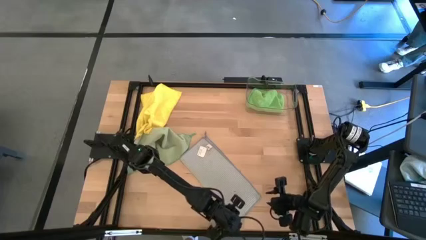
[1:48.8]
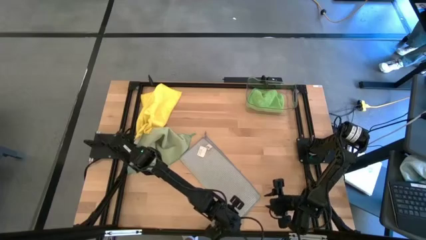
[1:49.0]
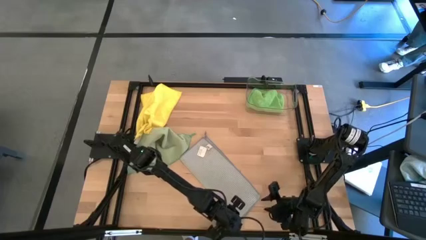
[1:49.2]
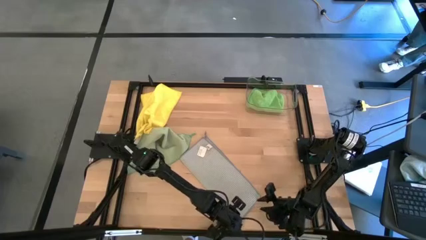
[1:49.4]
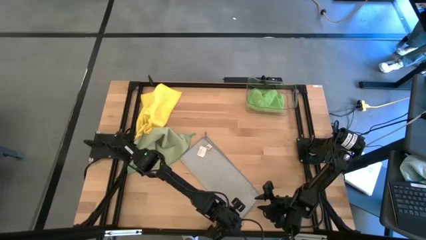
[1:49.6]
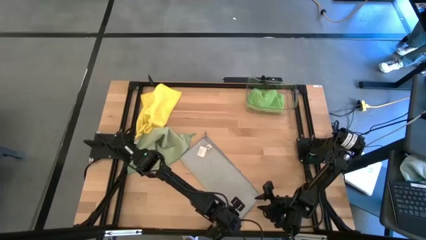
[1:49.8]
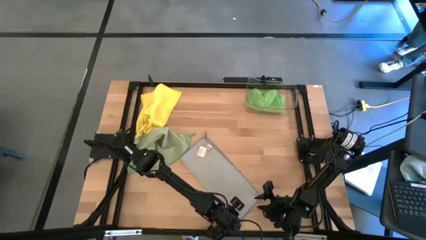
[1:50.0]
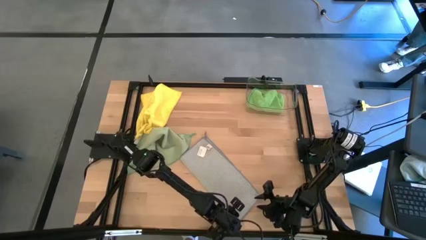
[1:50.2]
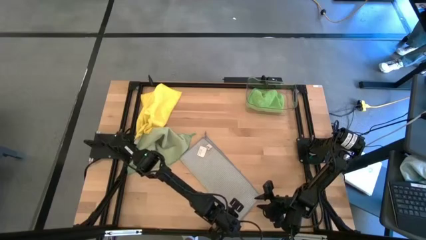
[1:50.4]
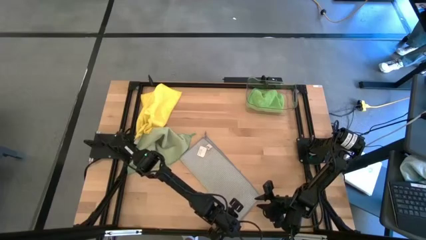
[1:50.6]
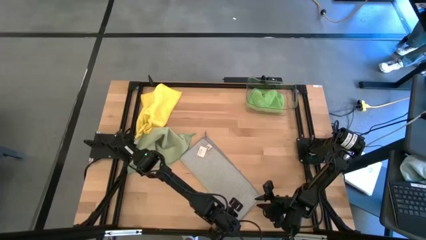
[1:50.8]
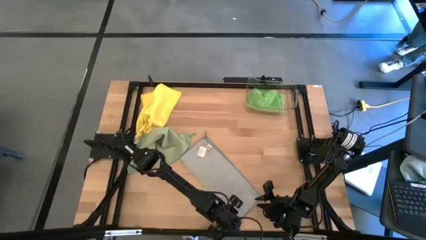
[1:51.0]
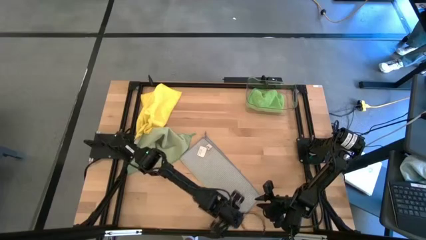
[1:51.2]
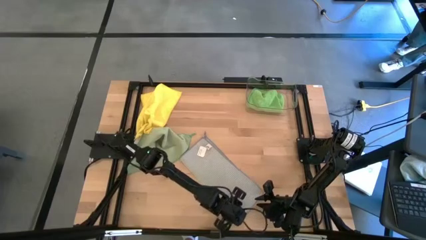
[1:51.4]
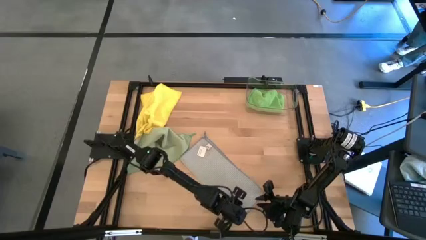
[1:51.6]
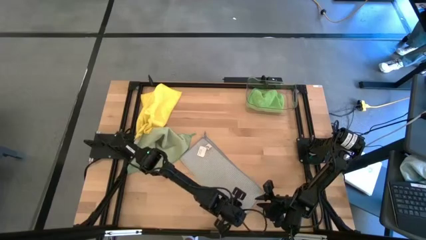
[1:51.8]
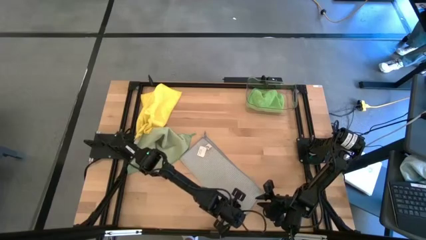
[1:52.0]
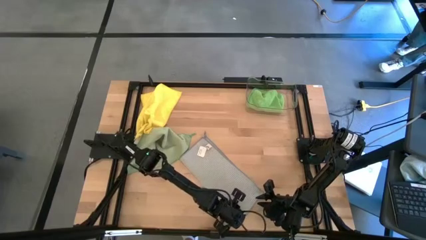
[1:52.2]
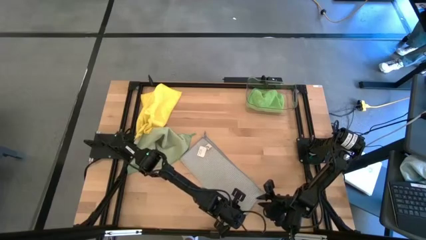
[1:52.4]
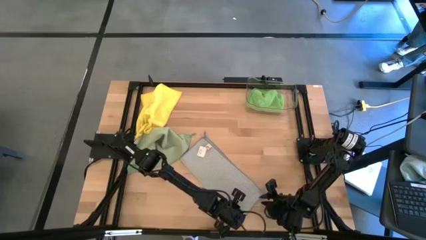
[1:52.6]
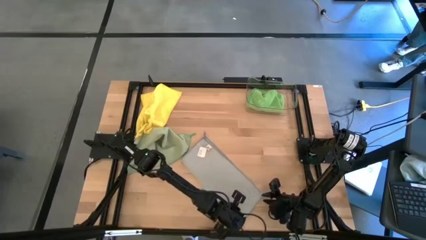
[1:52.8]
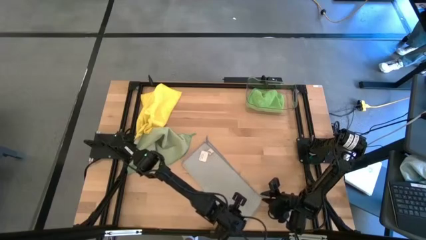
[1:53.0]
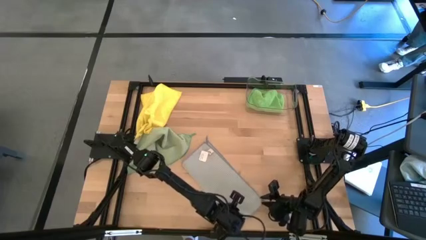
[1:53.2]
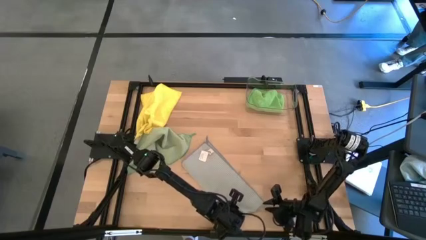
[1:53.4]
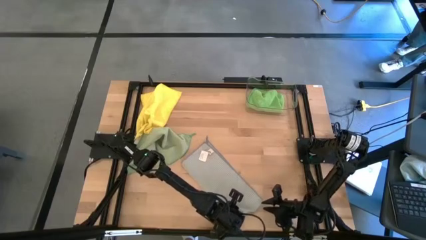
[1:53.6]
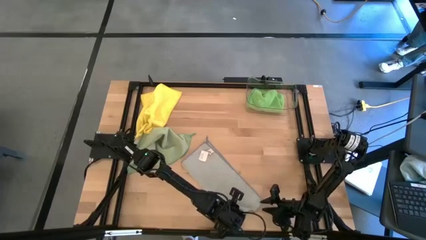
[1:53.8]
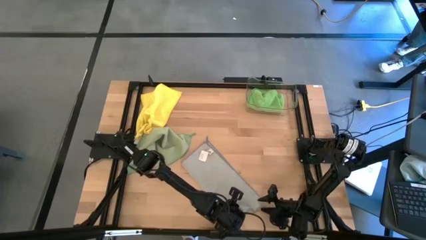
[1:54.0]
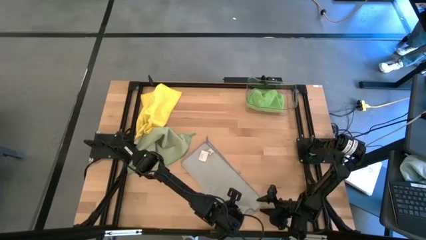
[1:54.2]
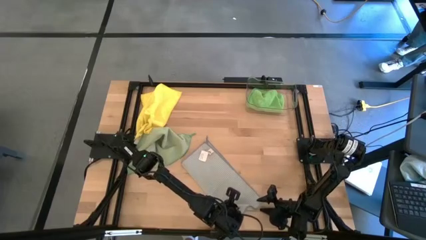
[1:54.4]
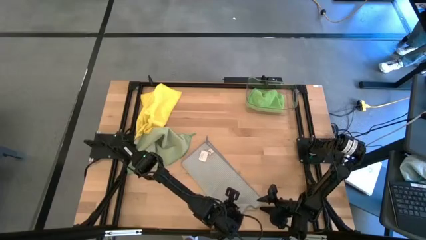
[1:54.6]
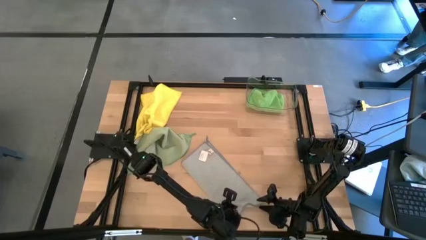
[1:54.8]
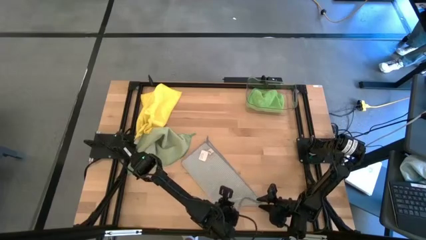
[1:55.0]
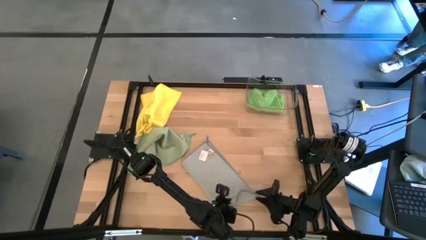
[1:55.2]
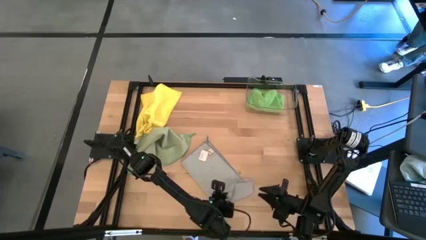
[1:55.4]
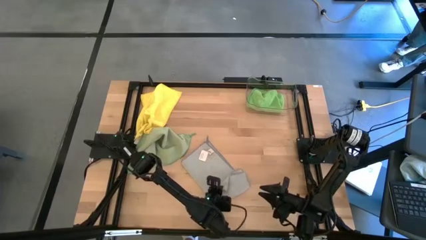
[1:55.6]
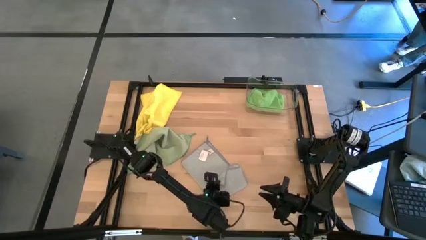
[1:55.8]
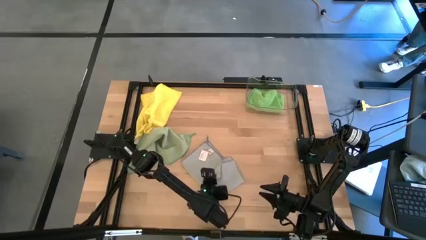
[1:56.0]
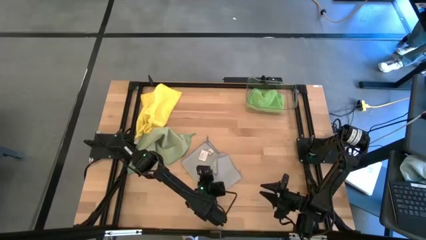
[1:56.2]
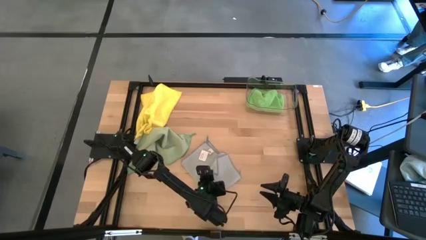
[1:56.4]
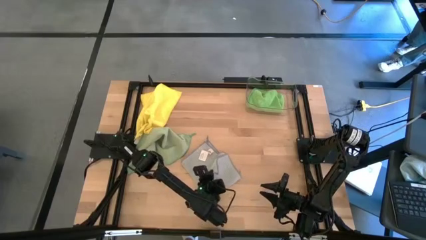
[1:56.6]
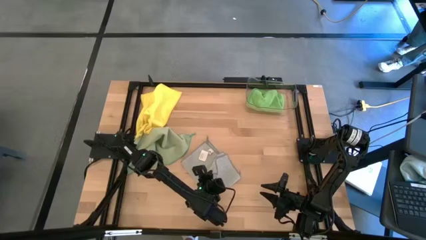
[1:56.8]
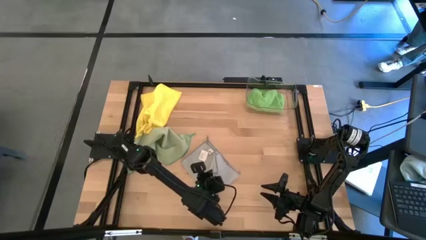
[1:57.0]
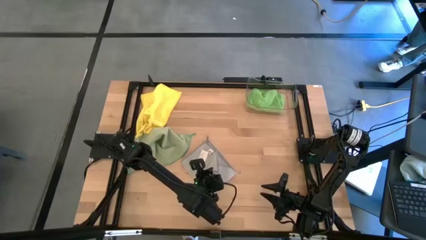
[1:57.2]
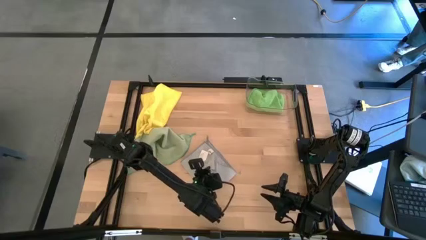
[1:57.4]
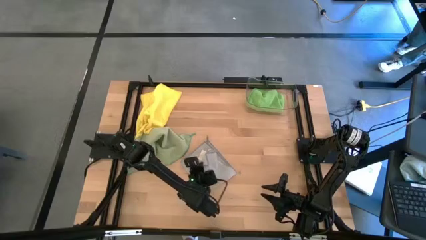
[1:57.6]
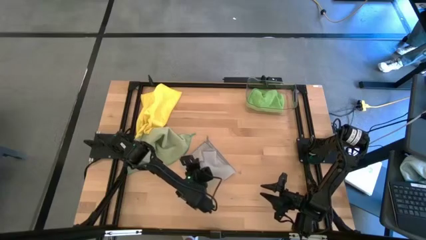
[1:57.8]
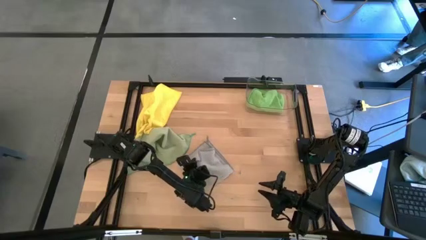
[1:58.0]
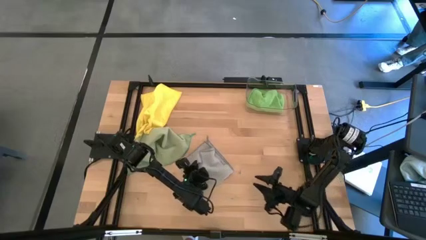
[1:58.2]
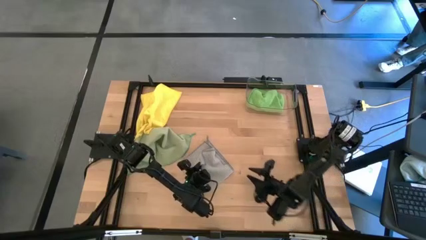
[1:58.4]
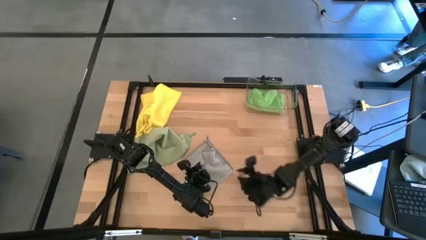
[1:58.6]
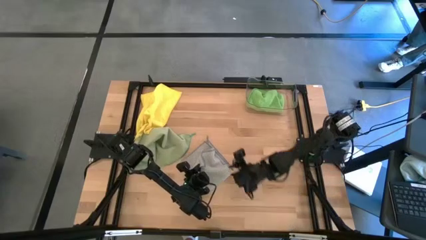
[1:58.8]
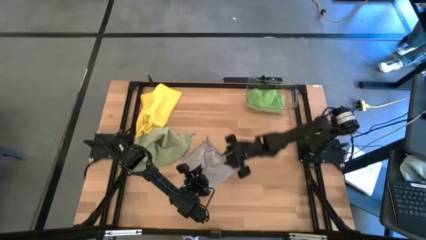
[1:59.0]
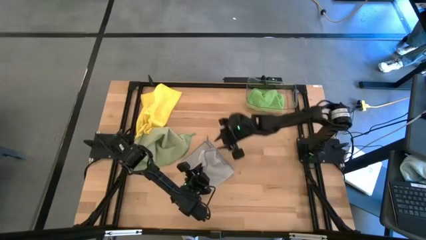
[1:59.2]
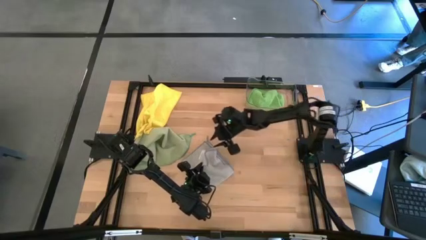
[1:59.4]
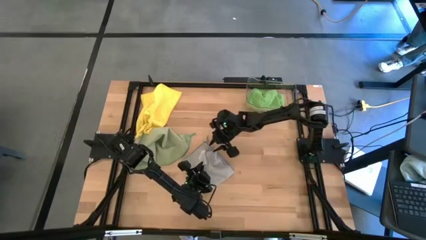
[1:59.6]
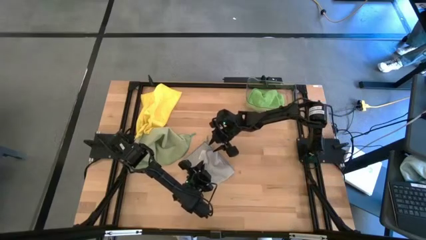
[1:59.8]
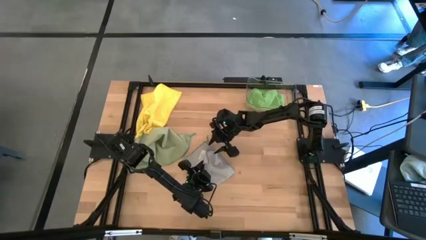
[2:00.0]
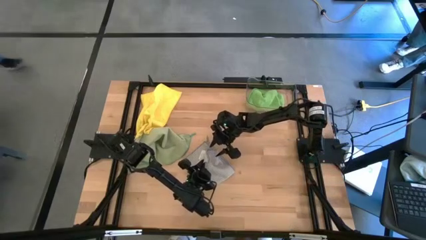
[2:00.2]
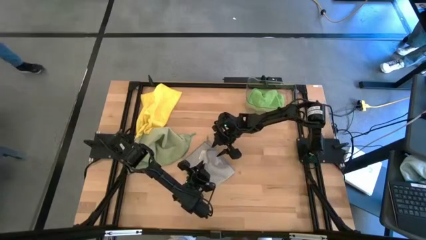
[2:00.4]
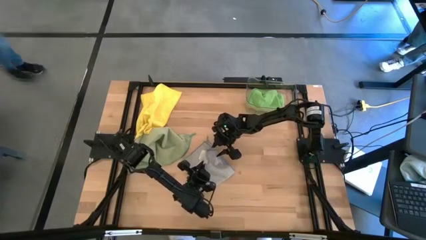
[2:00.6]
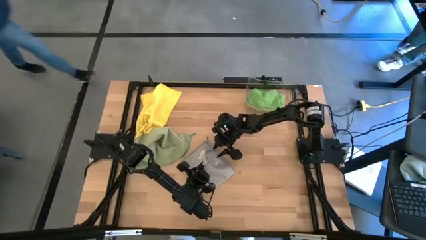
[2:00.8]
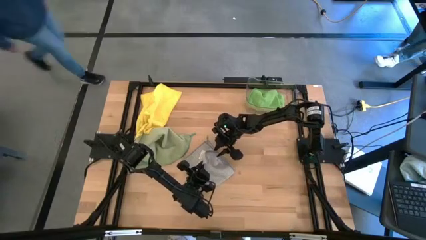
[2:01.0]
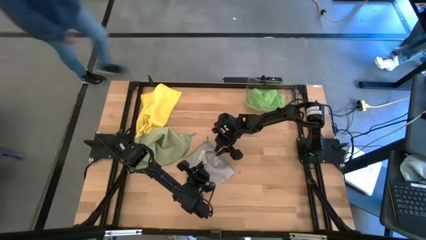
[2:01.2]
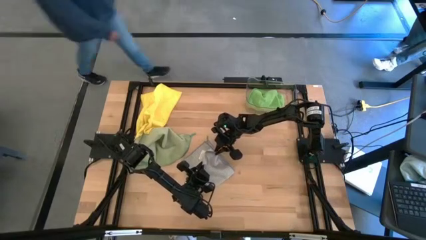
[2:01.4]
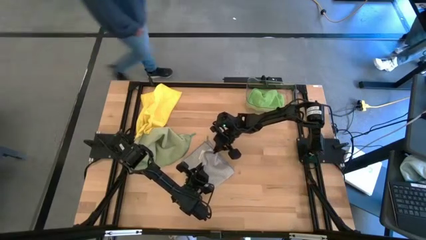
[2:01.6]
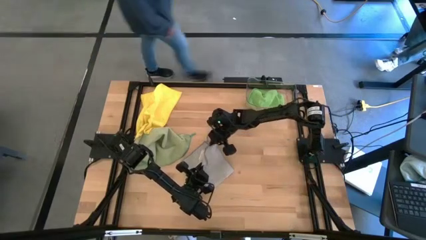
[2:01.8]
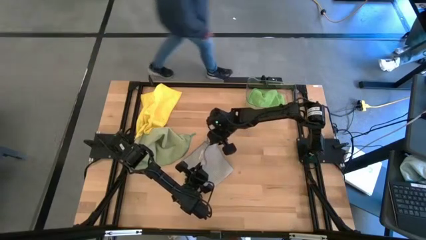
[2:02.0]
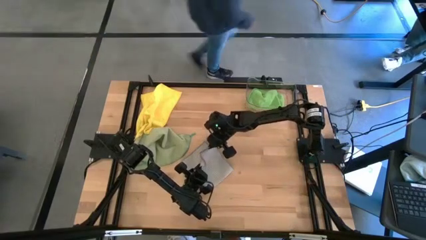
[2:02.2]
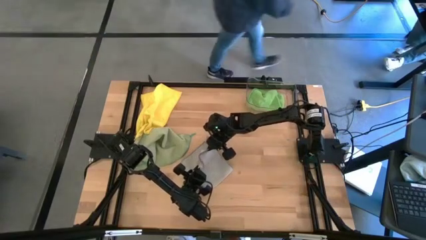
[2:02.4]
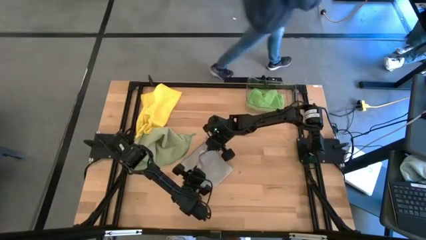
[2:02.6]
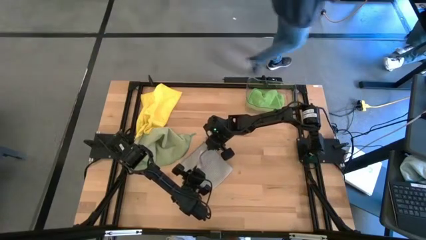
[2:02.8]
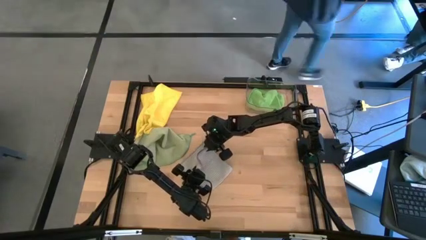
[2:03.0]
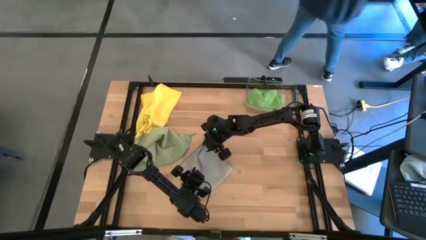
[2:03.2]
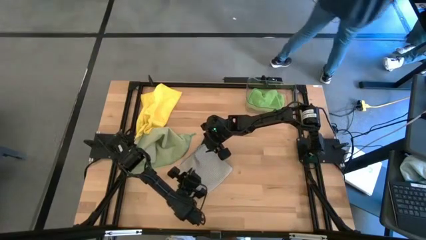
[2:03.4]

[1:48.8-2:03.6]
Task: Fold microfiber towels
Fold the gray cloth
